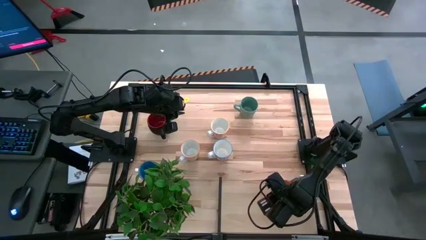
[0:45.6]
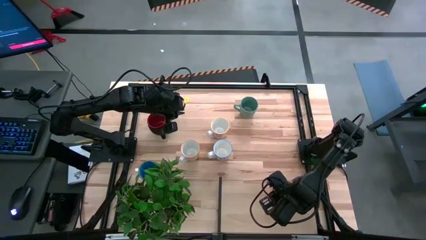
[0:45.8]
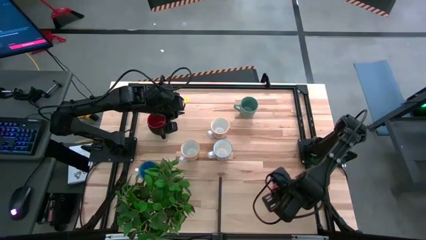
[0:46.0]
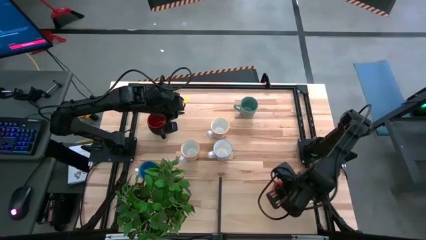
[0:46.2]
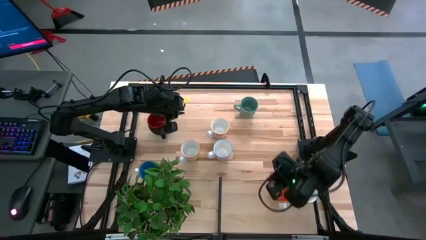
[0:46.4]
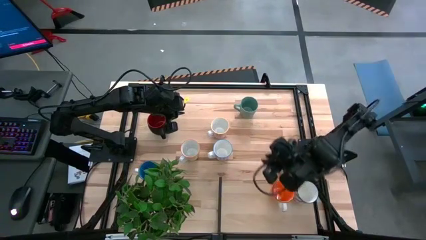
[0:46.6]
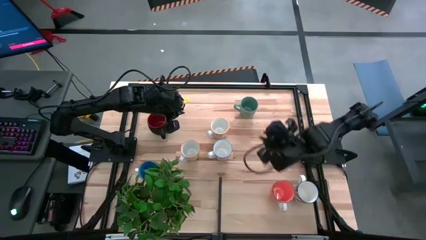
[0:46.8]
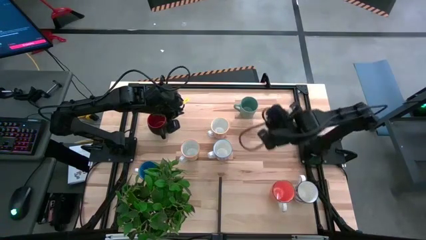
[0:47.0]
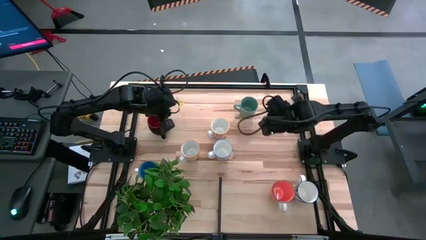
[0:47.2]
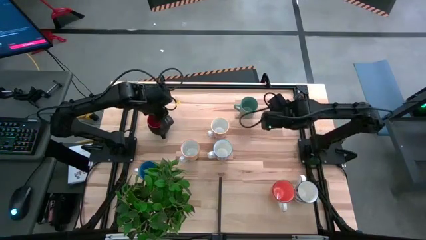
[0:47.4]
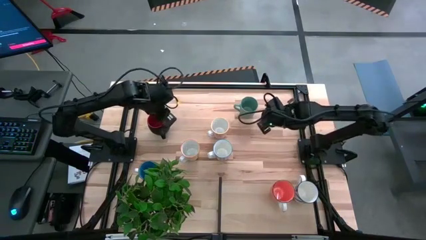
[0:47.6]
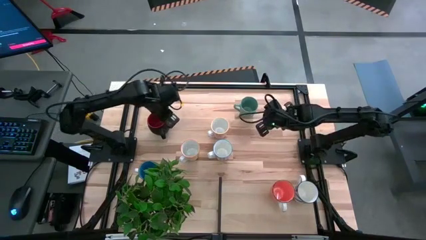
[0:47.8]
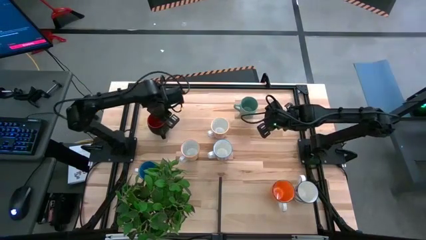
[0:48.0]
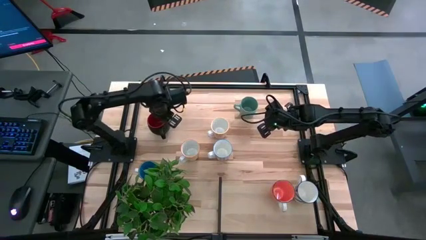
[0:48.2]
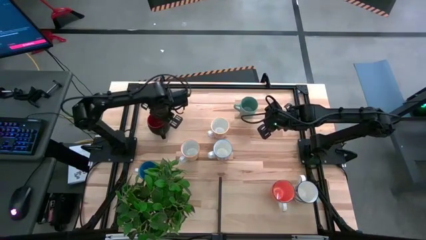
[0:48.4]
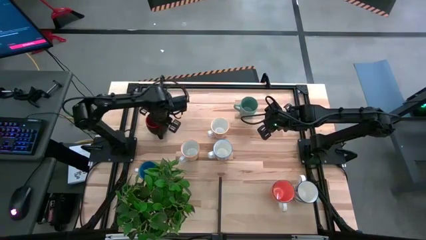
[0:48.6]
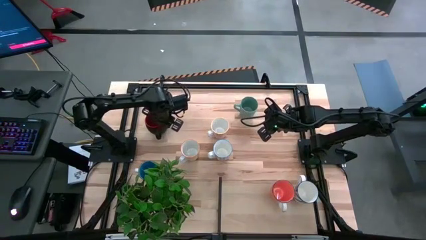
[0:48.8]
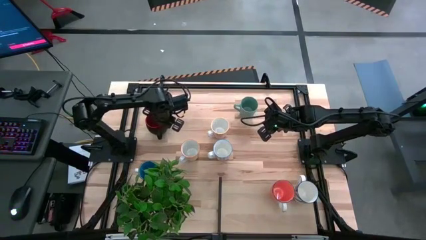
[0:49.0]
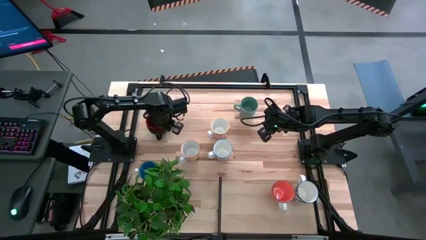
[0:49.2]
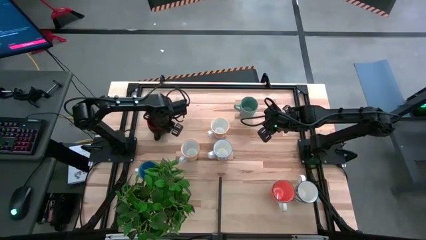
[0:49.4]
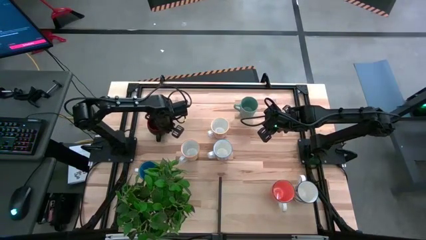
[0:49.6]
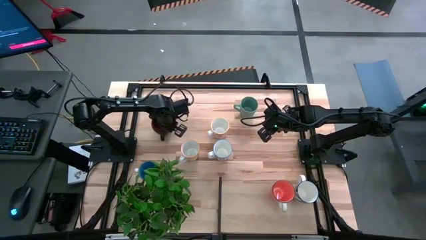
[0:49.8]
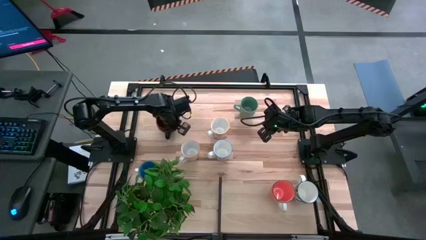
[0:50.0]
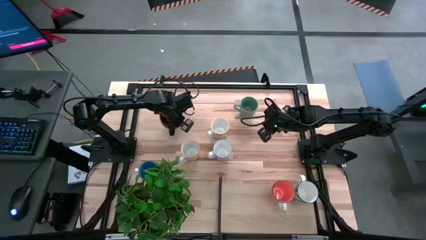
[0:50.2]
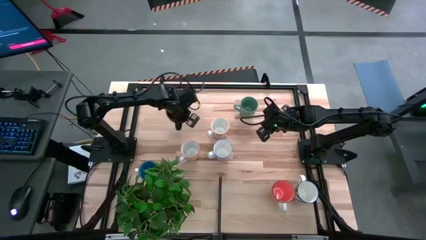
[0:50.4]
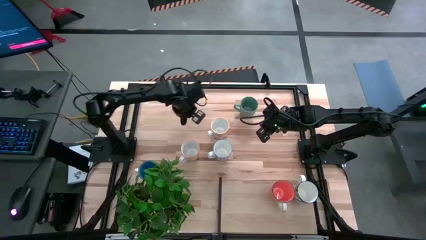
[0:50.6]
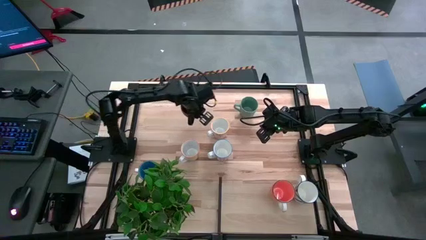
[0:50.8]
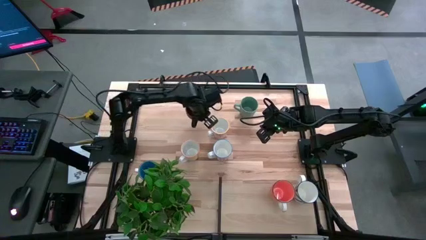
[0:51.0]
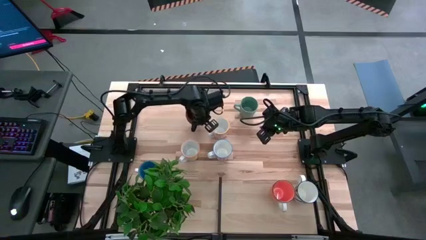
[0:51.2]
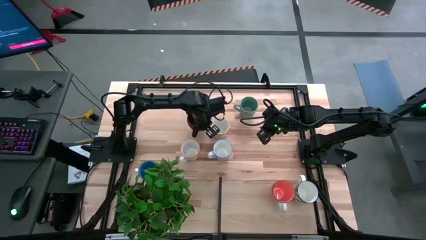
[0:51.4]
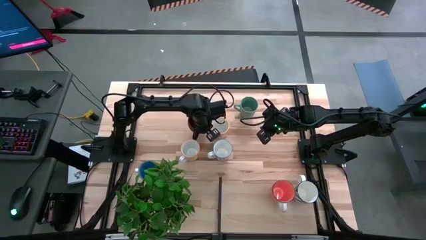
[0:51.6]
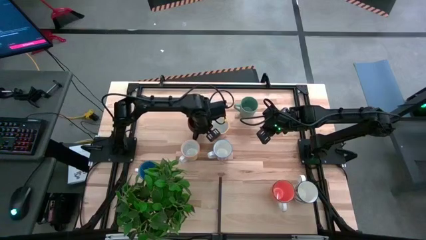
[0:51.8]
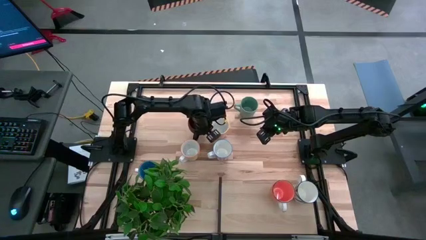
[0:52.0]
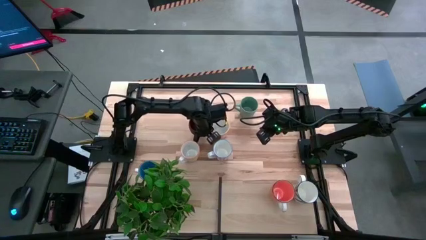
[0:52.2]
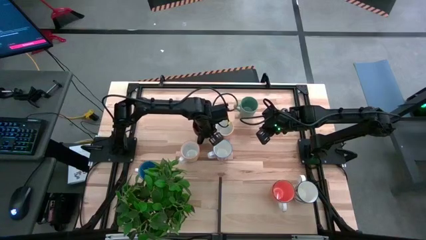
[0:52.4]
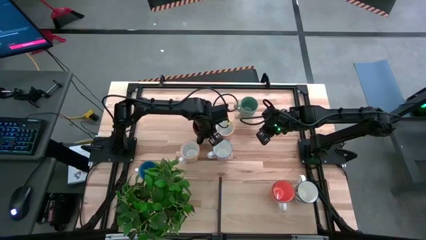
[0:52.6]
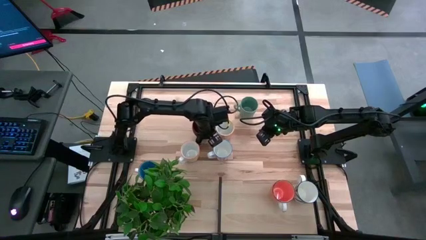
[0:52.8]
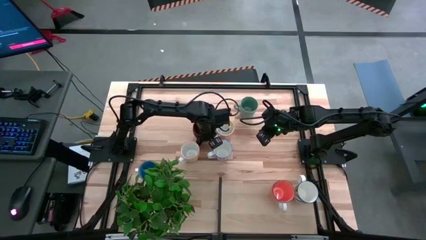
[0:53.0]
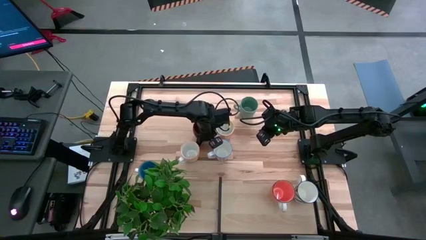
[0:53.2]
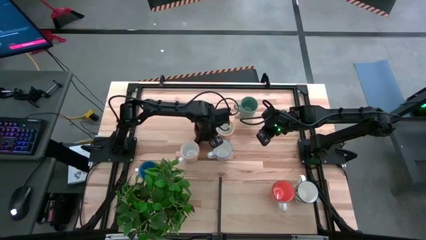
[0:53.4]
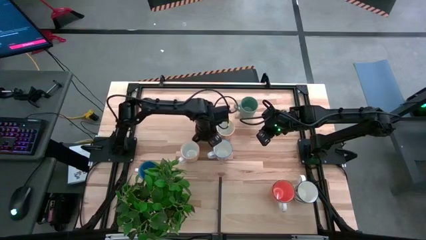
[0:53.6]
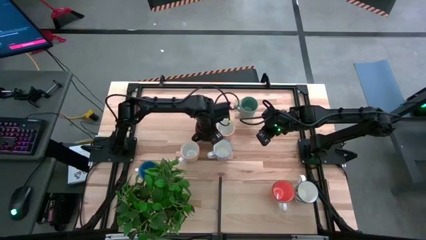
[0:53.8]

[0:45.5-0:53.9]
Task: Place coffee mugs
Move the black mug to the left of the orange patterned mug

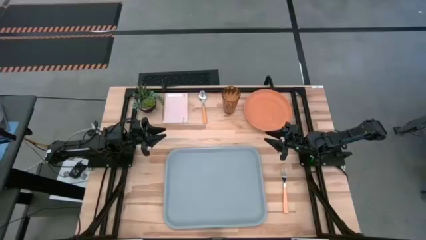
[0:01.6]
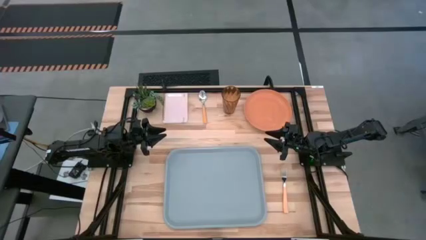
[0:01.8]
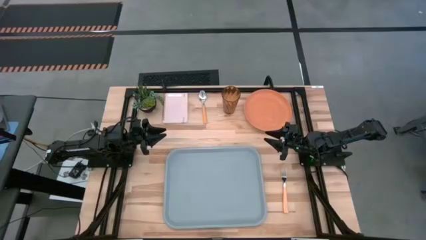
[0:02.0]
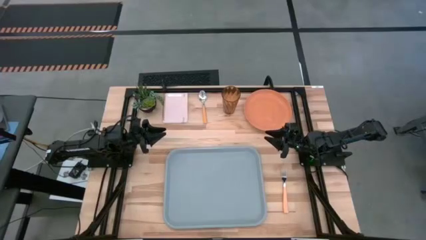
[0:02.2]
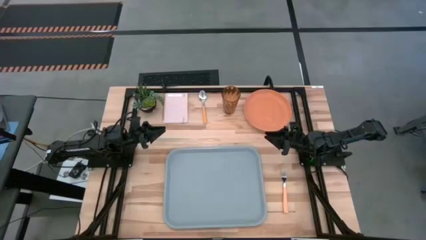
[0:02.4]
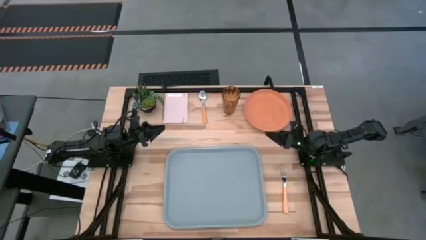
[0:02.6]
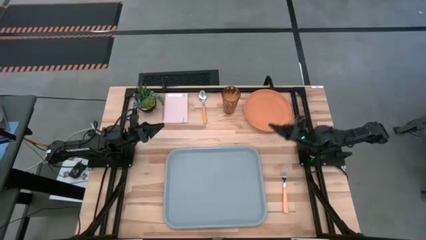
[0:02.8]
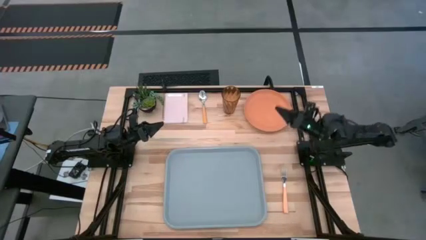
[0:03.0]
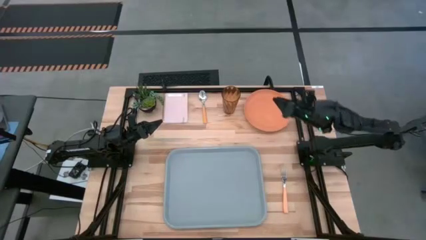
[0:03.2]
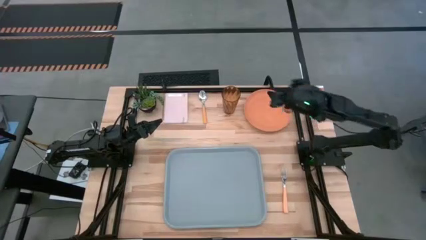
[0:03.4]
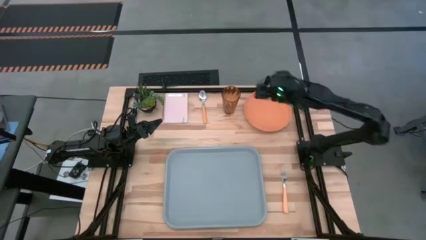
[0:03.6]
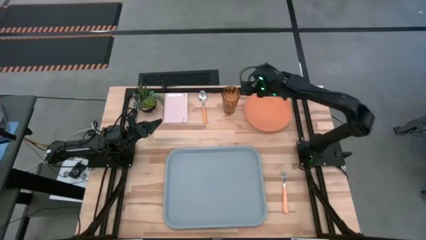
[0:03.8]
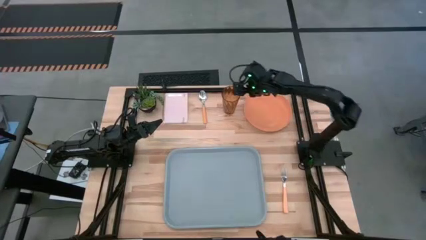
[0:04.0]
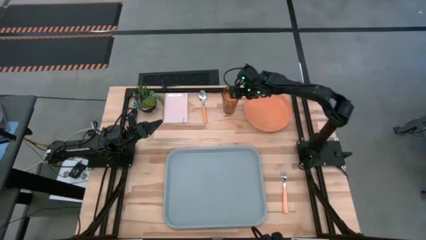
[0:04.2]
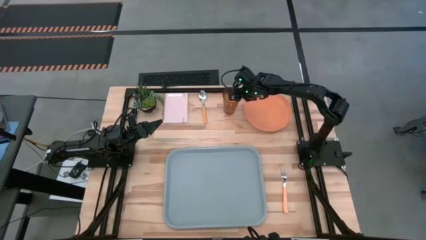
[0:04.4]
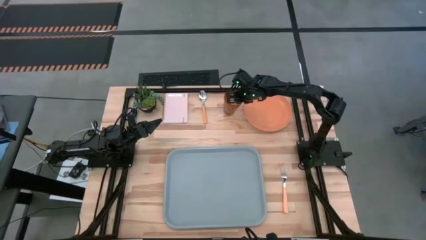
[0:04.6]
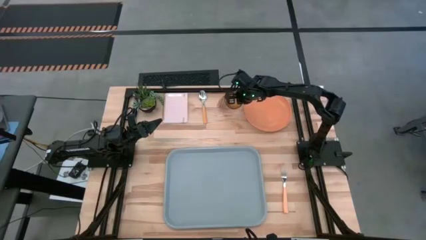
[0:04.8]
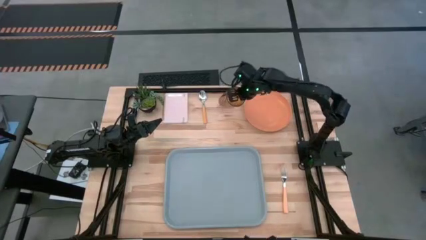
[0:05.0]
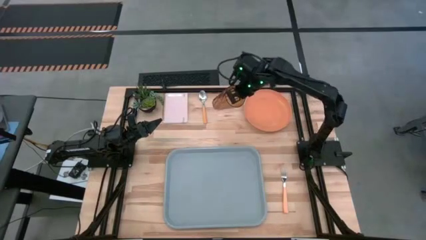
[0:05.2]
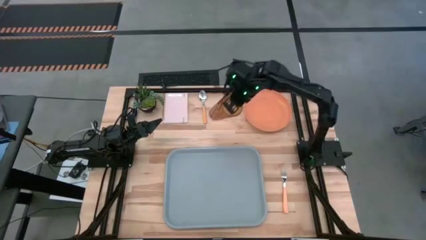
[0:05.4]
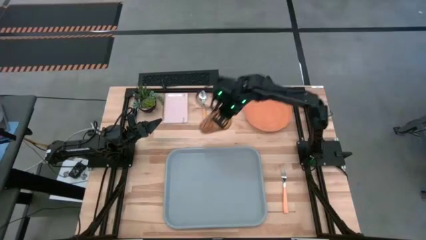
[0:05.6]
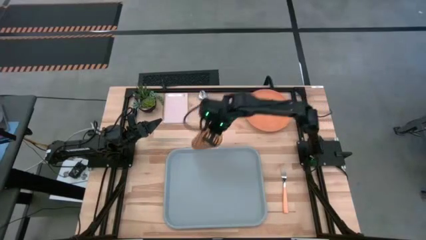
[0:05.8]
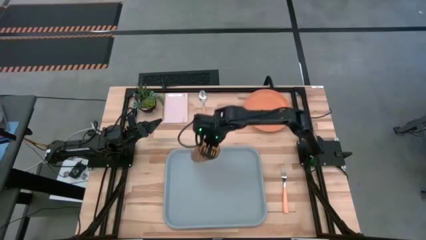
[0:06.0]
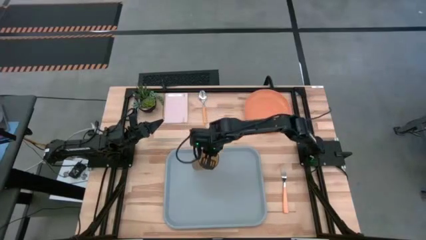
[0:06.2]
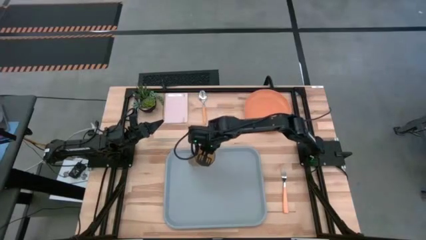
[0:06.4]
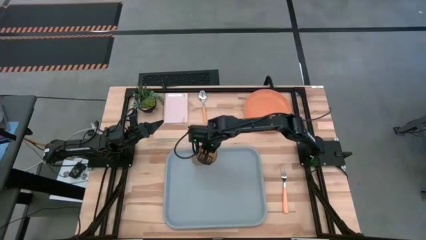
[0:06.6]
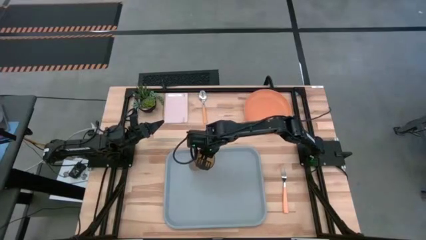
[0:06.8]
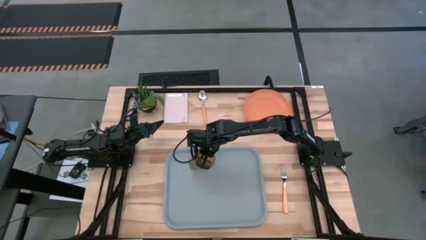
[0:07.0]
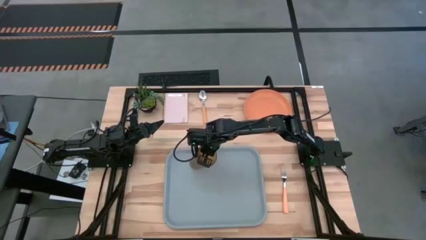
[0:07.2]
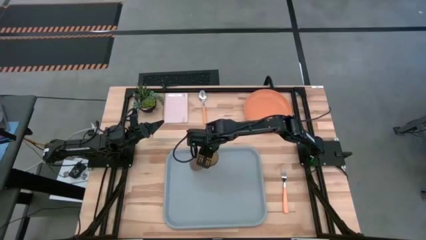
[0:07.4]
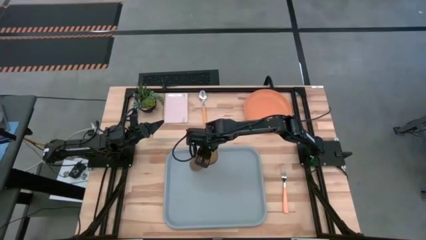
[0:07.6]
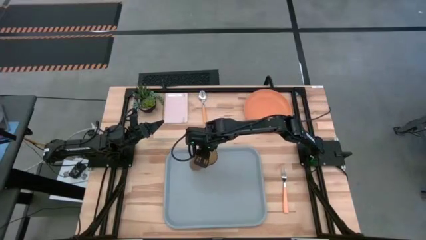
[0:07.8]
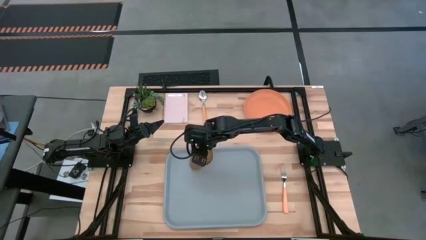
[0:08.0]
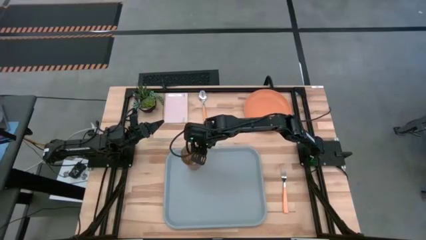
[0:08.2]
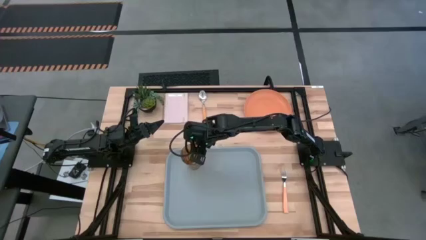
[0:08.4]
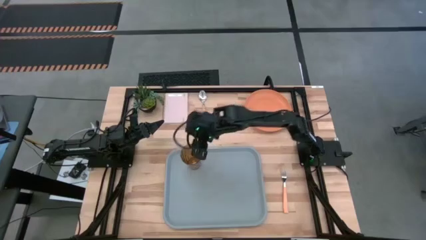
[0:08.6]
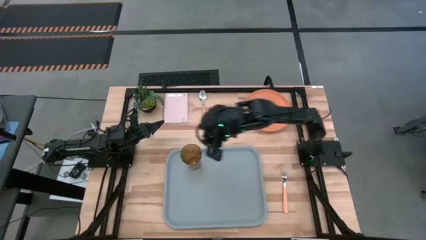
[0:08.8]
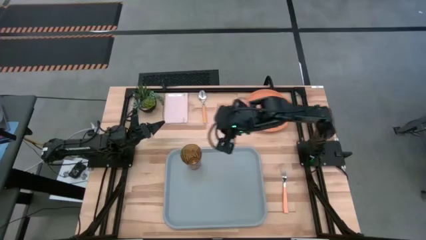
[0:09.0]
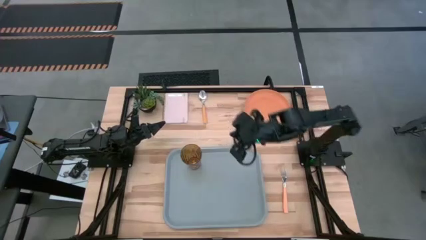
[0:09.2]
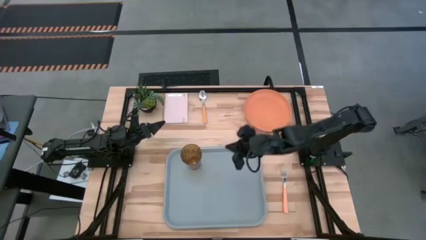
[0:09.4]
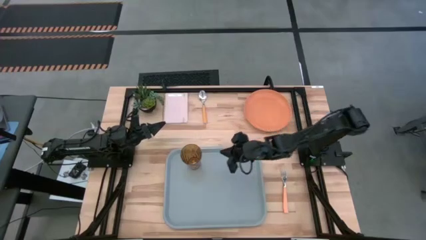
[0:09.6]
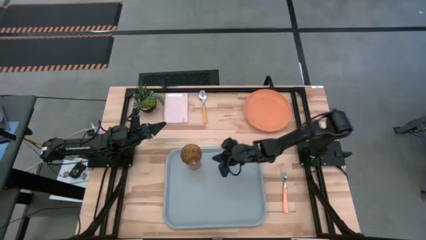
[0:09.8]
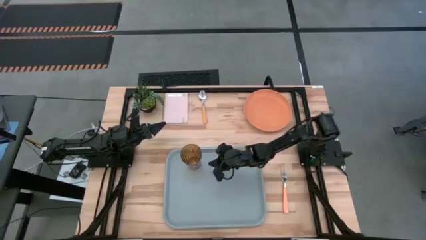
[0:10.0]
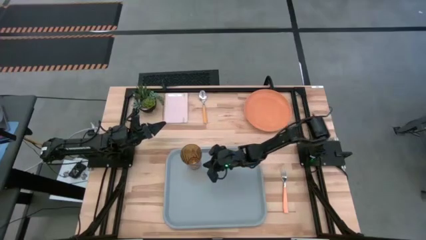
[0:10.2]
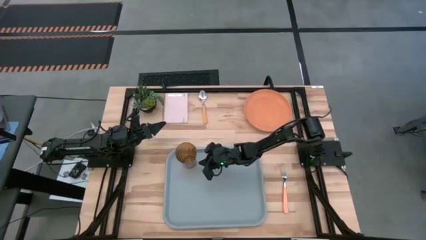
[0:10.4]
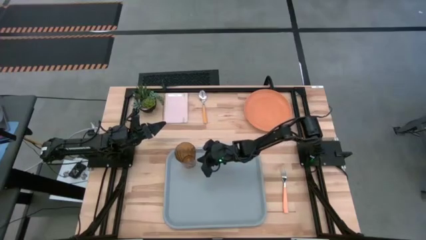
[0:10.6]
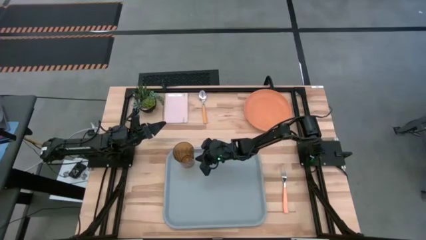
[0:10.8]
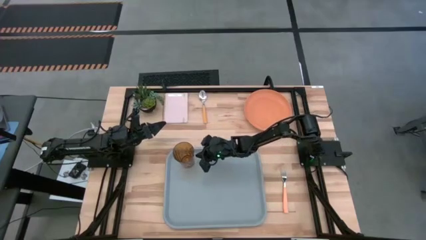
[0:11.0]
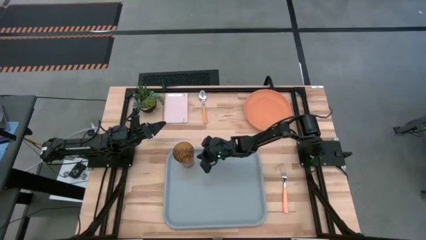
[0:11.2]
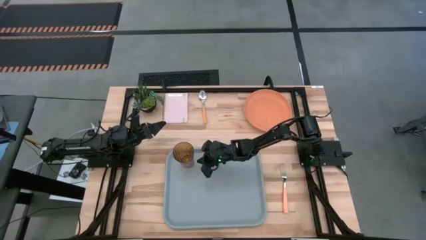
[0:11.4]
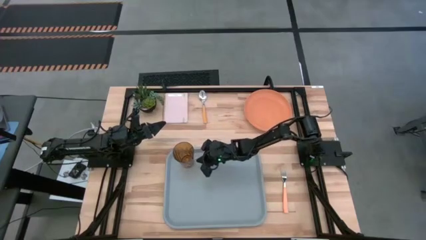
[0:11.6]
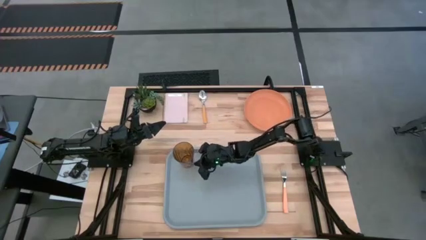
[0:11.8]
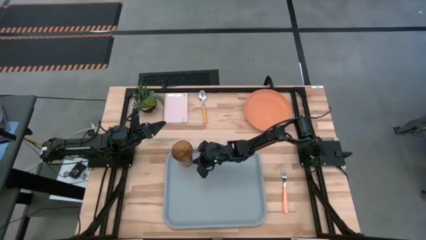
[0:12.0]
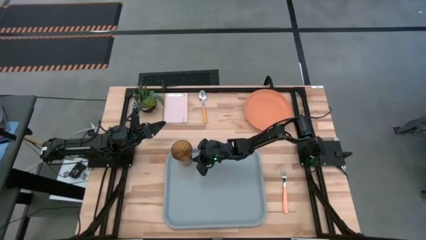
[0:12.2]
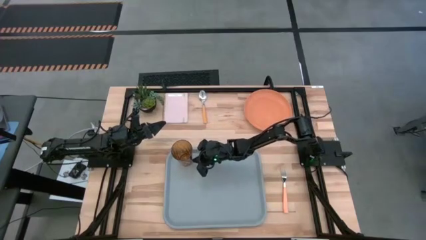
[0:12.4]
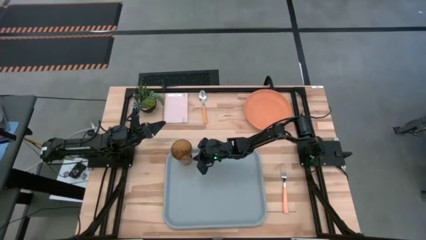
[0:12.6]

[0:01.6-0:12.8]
Task: Pick and place plate/cup/fork/spoon on tray
Put the brown cup on the gray tray
